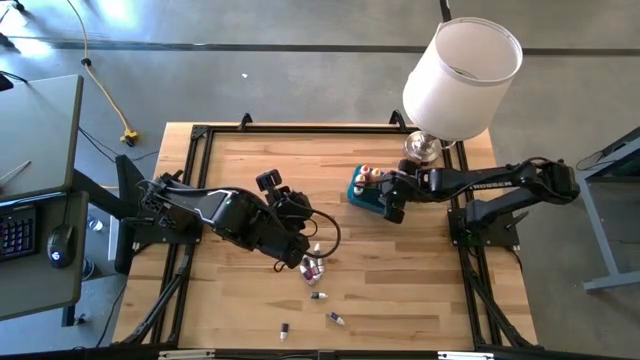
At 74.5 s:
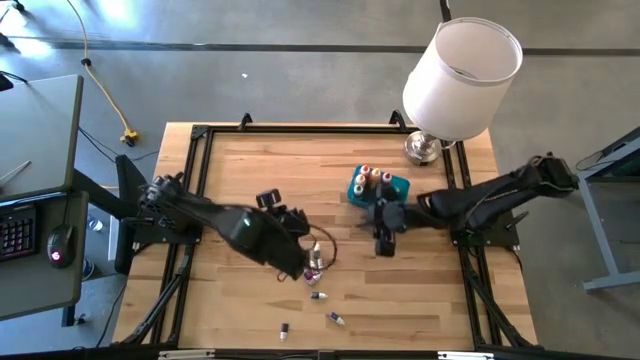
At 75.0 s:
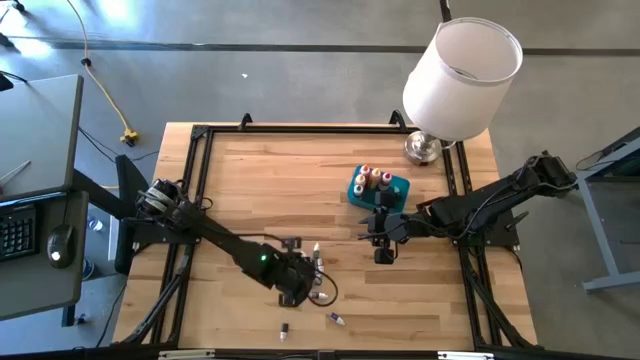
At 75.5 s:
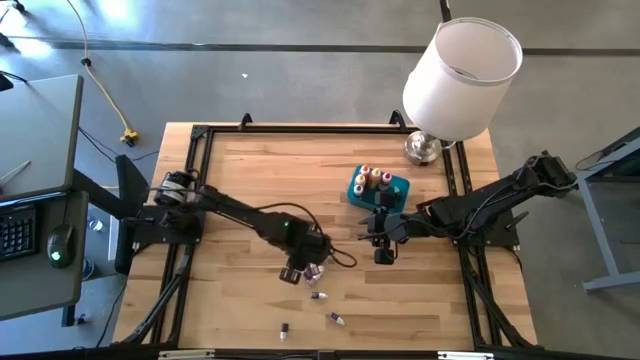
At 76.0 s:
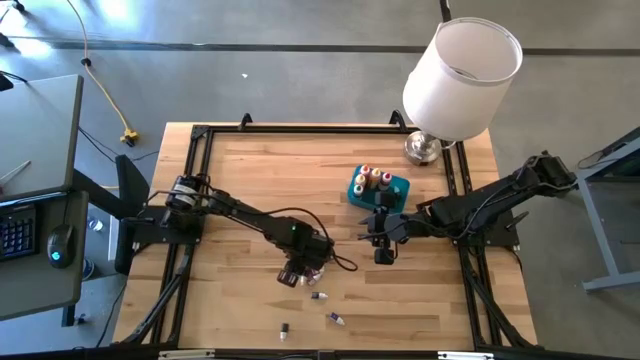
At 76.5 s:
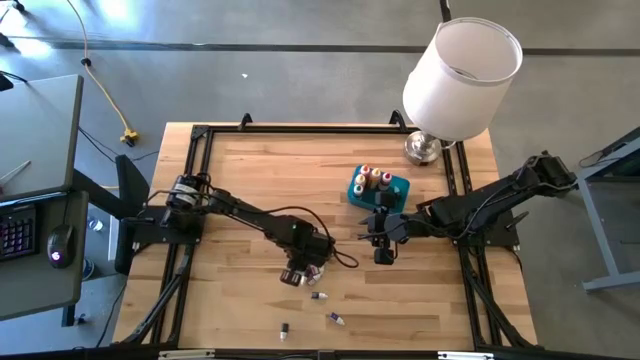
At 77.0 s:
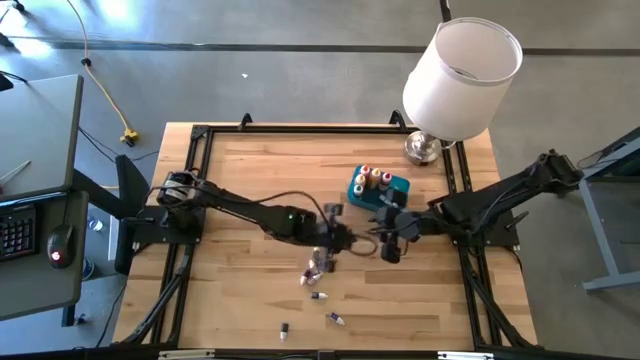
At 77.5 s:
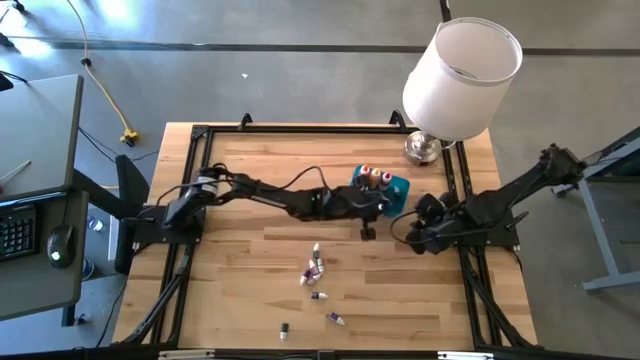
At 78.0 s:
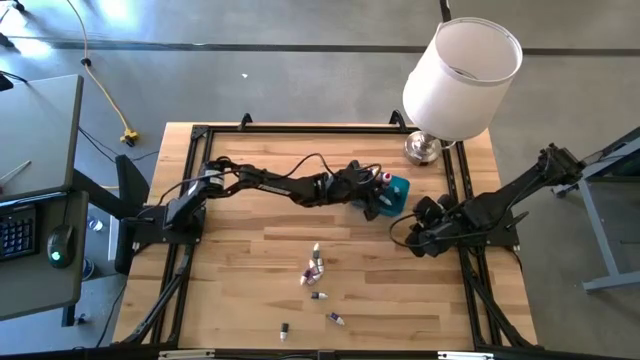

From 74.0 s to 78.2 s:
Task: Pick & Place food coloring
Put the small blue food coloring bottle into the blue bin

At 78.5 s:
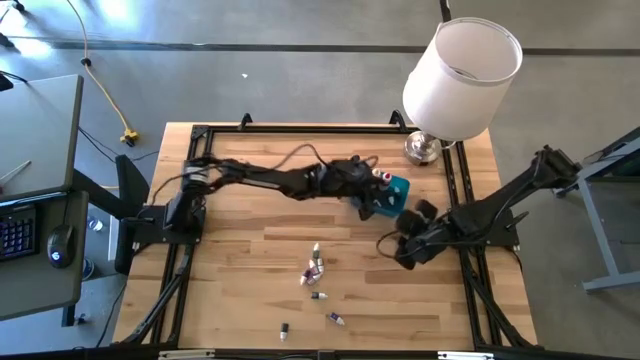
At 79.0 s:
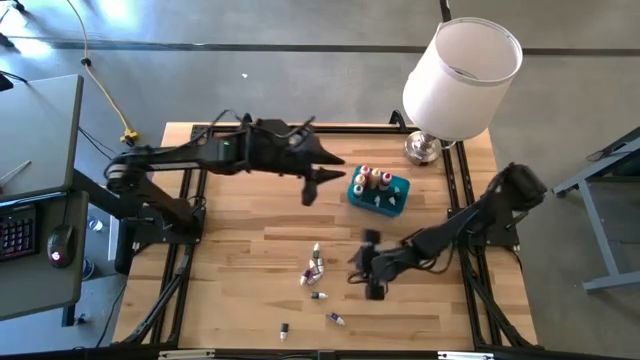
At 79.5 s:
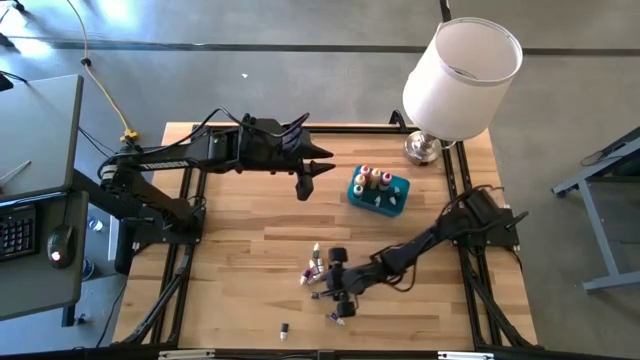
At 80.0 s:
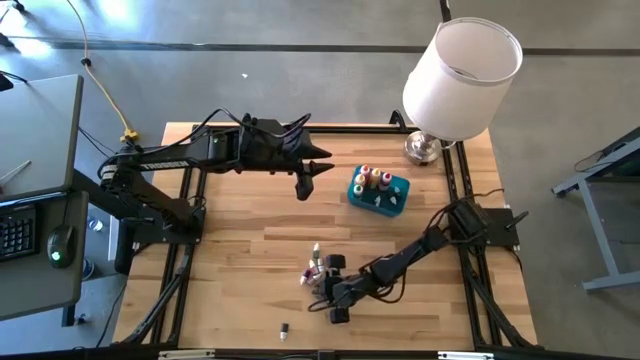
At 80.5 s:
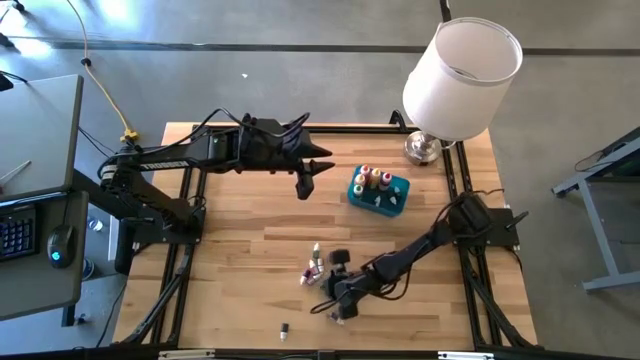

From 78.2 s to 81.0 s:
Put the bottom small green food coloring bottle into the blue bin

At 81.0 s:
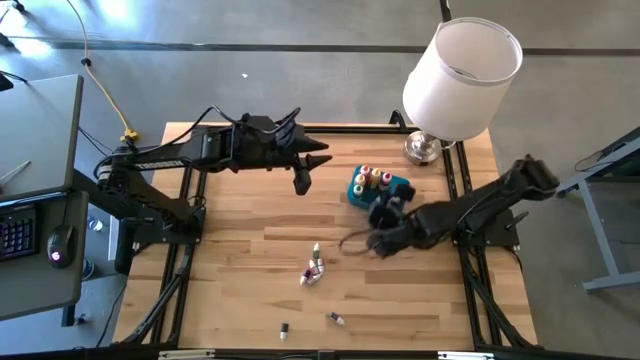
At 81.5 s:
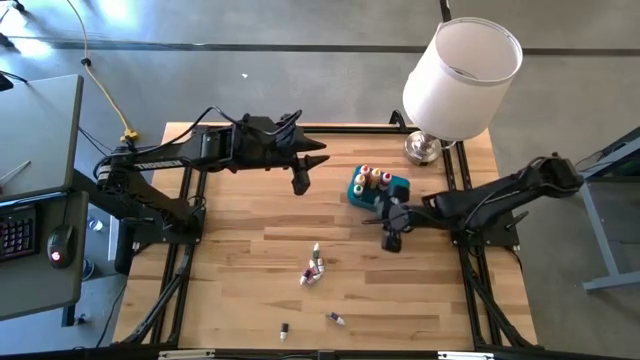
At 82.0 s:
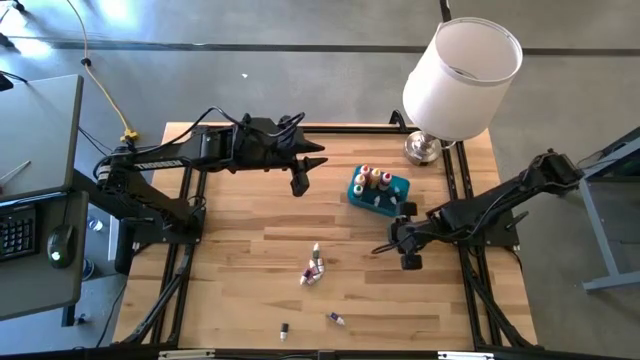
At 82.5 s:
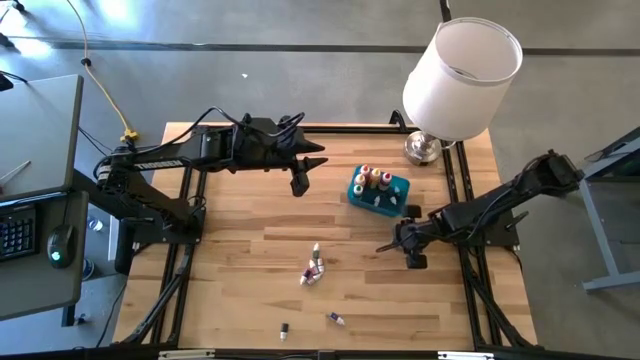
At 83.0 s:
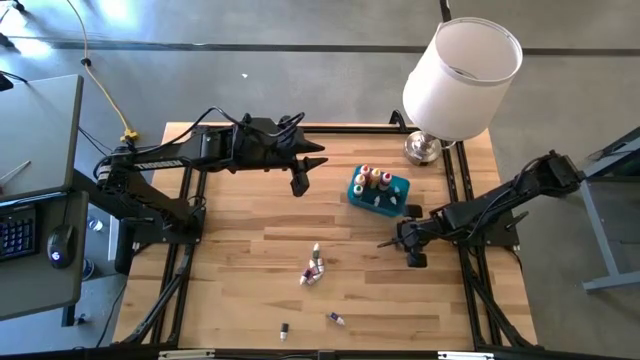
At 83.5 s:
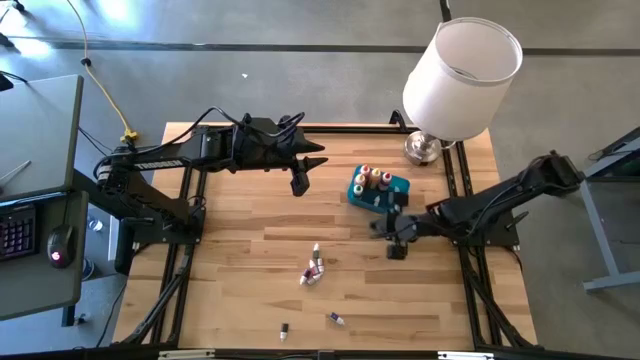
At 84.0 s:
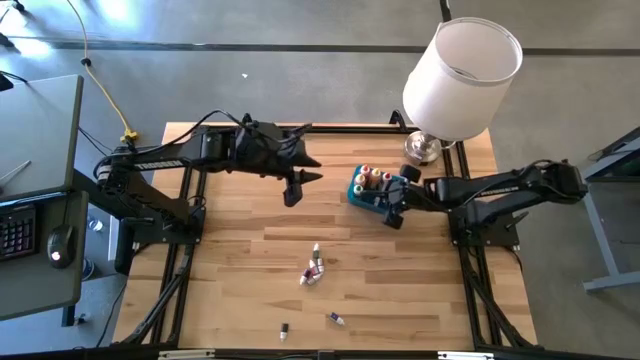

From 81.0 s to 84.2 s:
Put the bottom small green food coloring bottle into the blue bin

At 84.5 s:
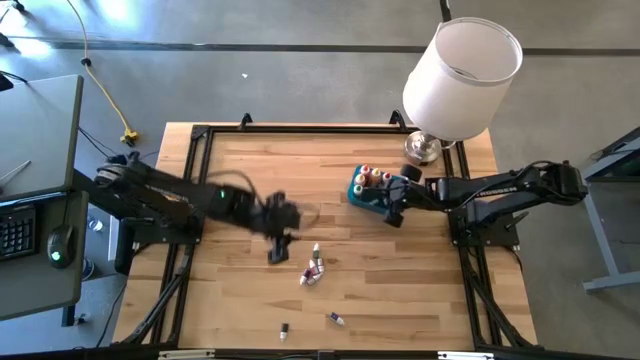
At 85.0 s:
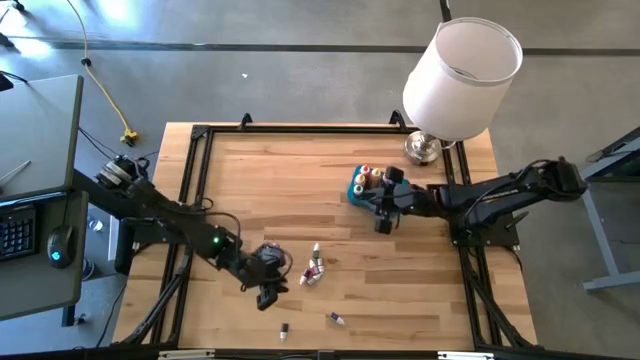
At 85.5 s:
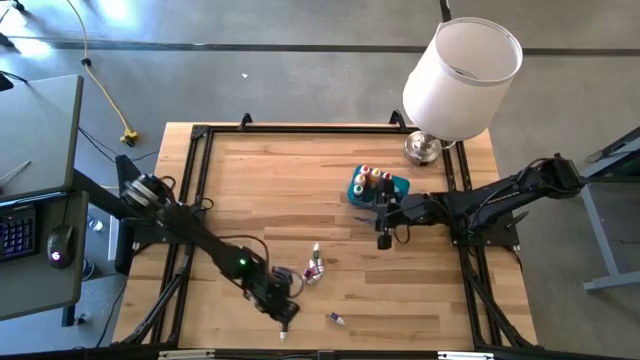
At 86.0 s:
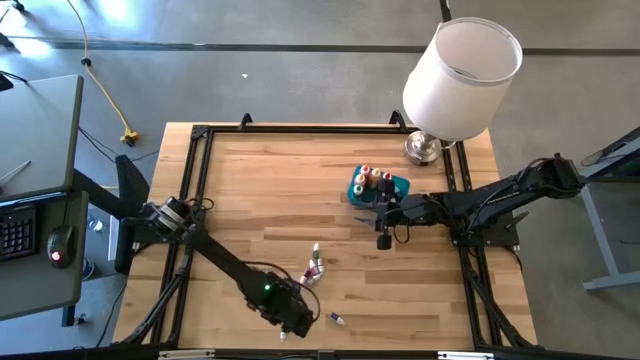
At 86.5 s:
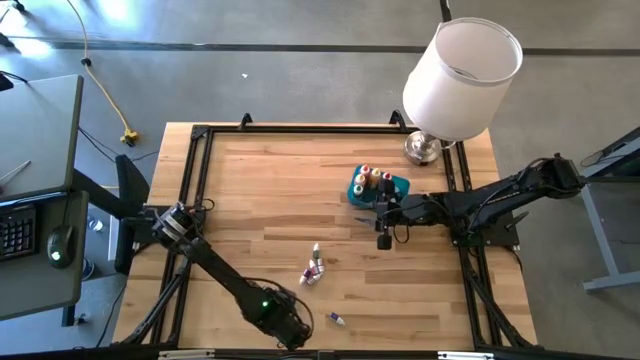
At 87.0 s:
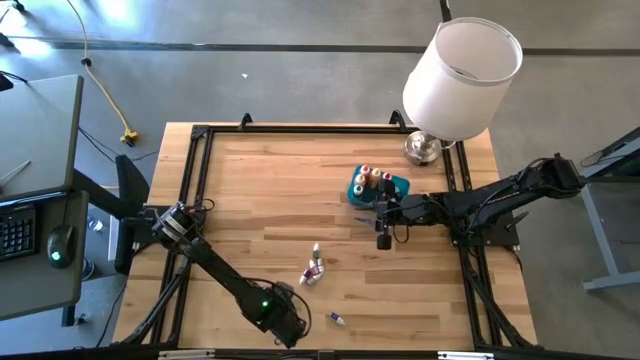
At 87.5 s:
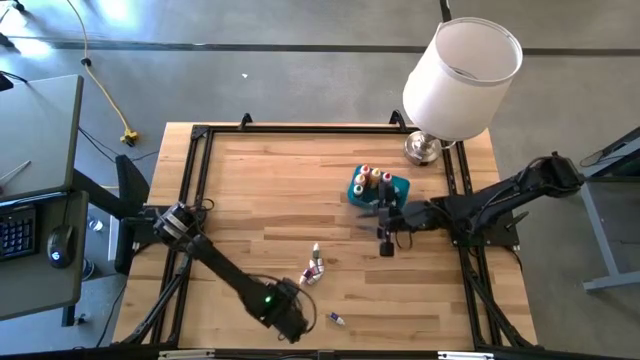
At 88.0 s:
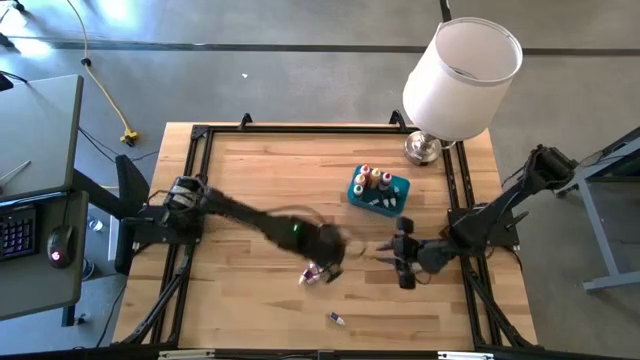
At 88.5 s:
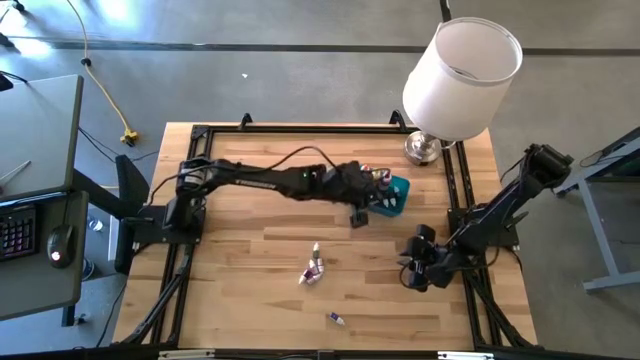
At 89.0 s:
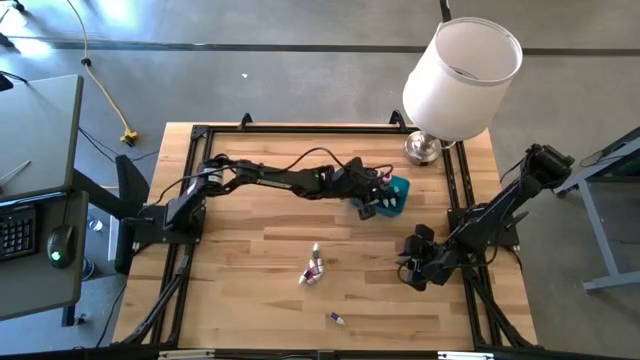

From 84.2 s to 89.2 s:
Put the small black food coloring bottle into the blue bin

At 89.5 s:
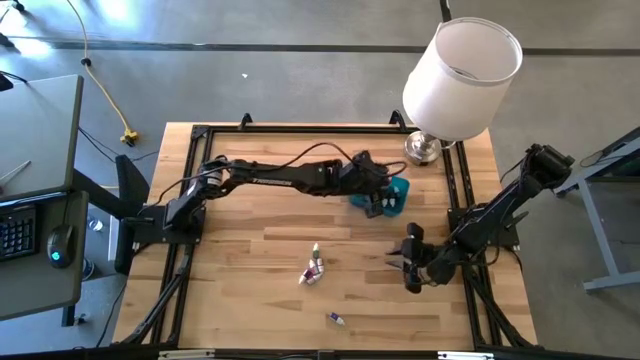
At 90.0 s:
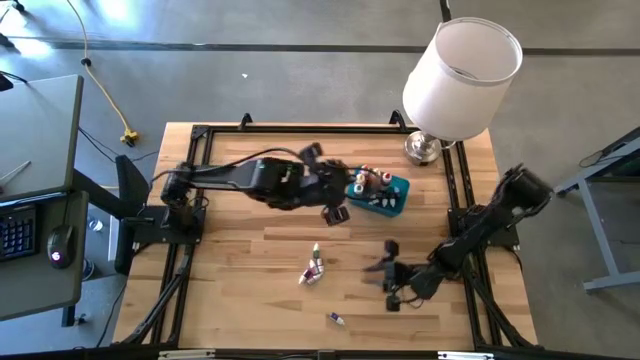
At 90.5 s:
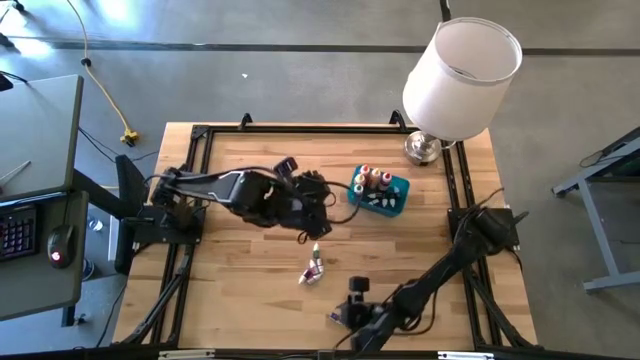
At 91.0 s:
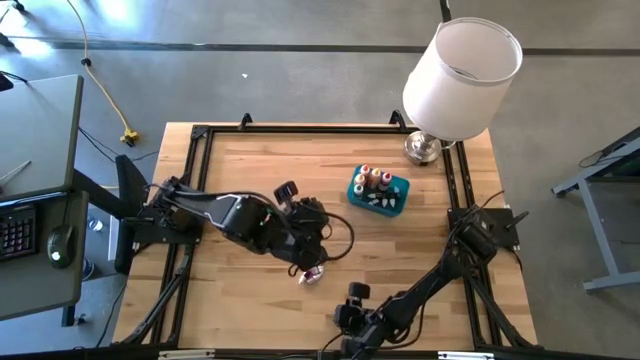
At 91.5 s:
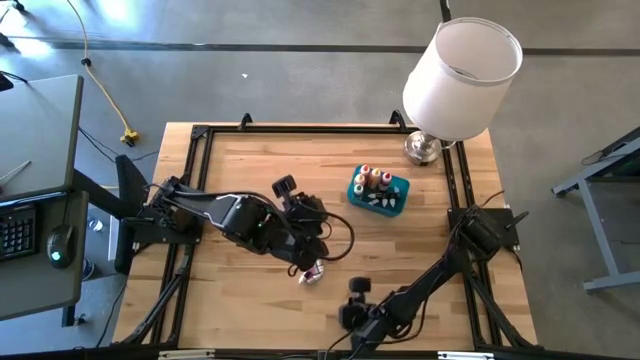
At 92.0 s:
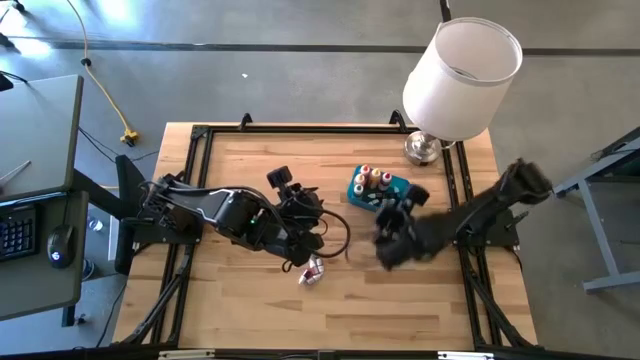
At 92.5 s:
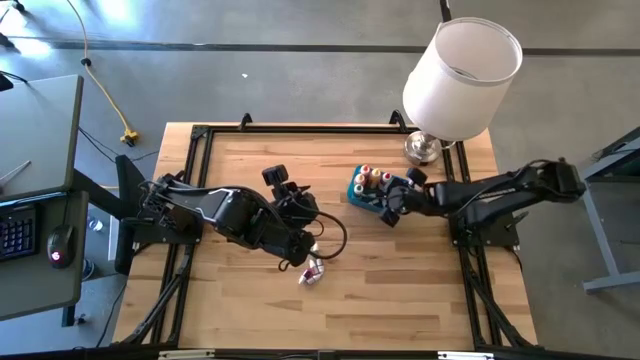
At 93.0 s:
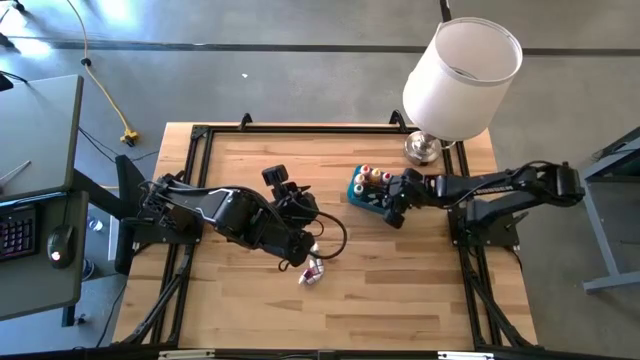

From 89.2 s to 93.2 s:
Put the small dark blue food coloring bottle into the blue bin

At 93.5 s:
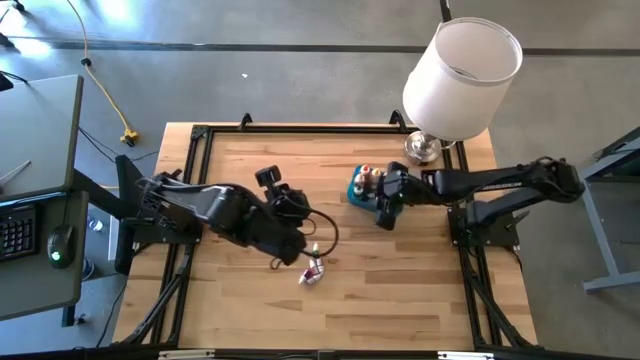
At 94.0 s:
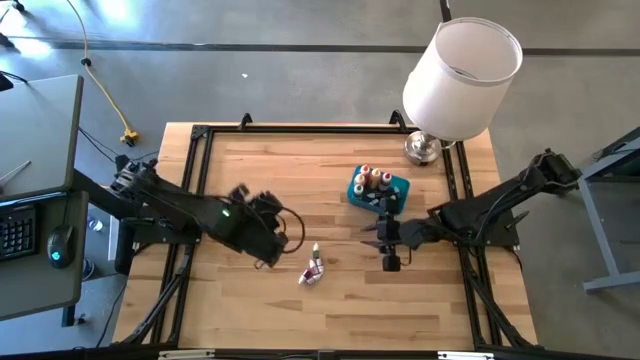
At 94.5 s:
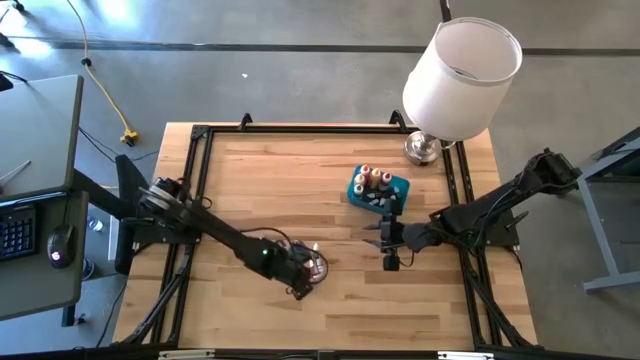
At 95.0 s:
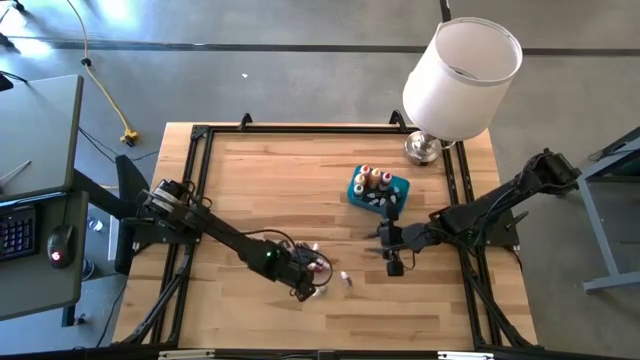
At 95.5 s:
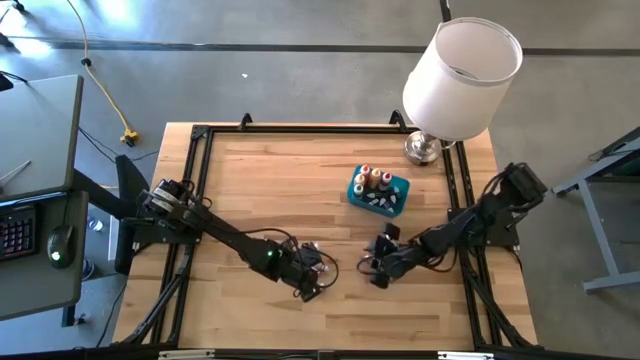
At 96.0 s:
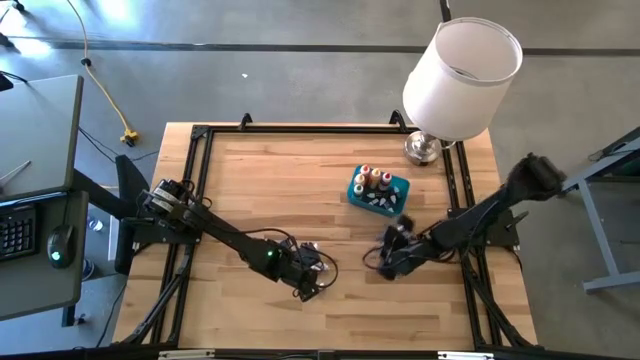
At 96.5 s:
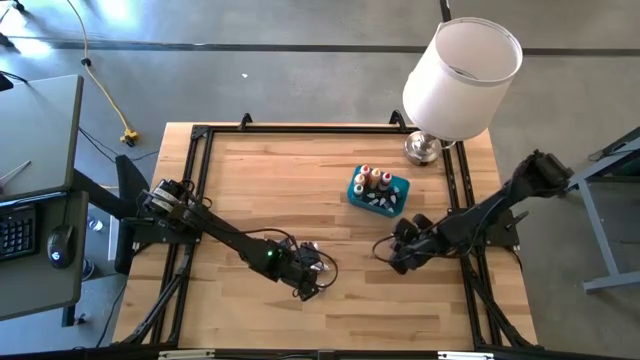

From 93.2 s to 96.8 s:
Put the bottom small red food coloring bottle into the blue bin
